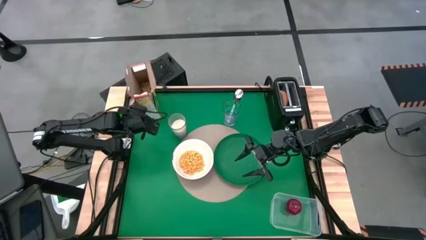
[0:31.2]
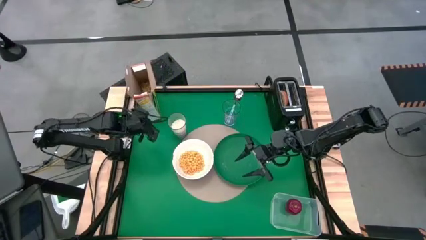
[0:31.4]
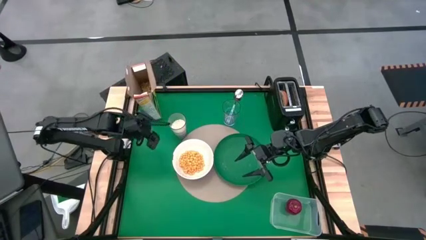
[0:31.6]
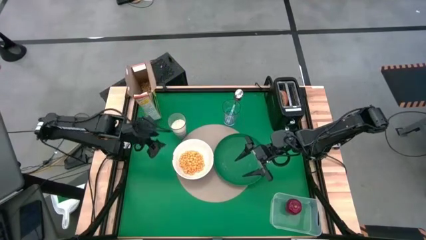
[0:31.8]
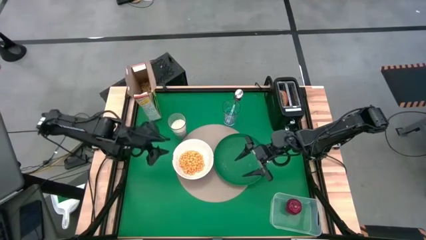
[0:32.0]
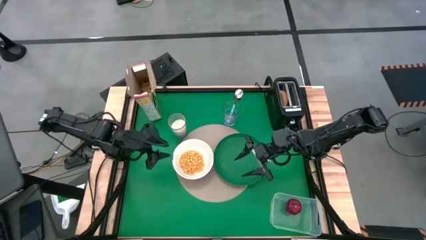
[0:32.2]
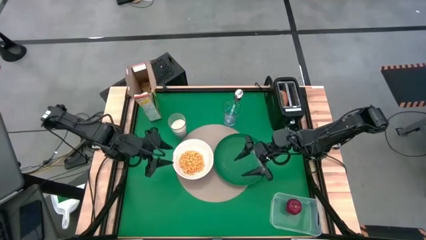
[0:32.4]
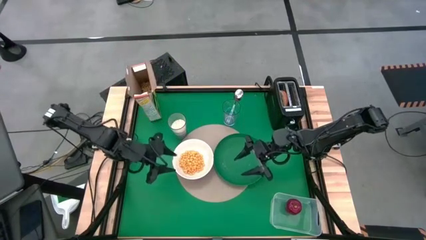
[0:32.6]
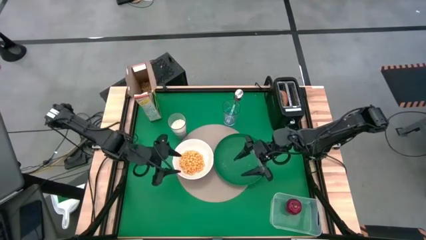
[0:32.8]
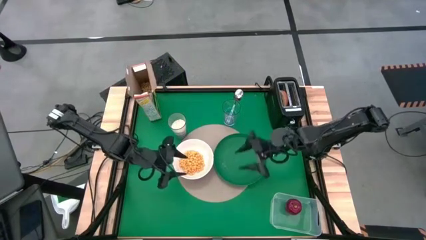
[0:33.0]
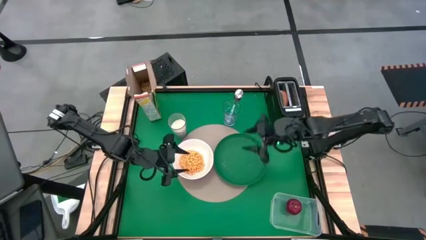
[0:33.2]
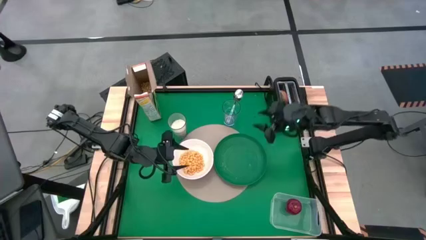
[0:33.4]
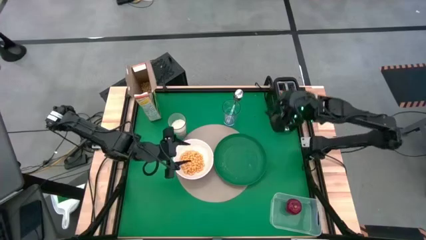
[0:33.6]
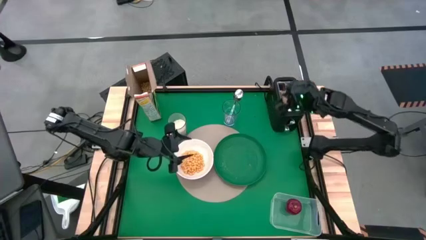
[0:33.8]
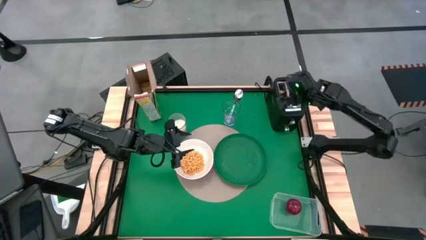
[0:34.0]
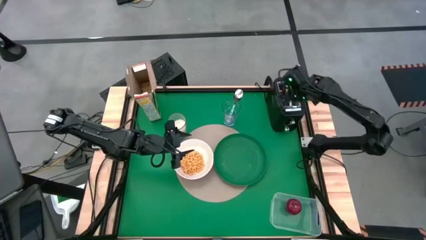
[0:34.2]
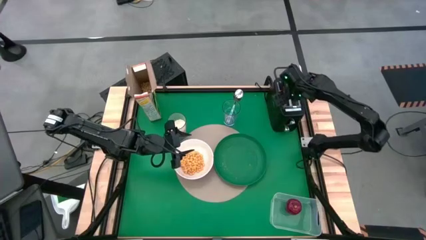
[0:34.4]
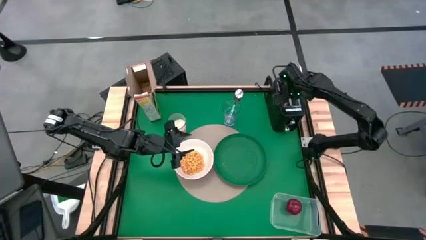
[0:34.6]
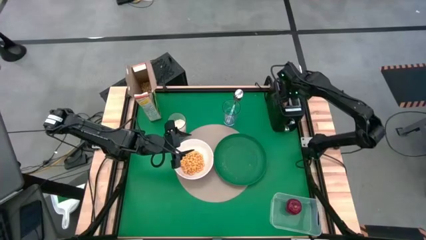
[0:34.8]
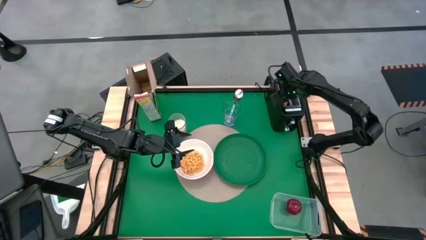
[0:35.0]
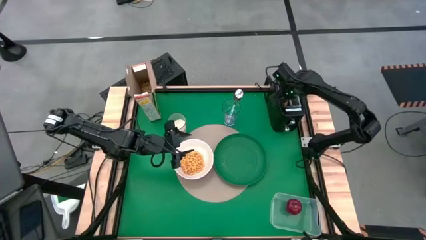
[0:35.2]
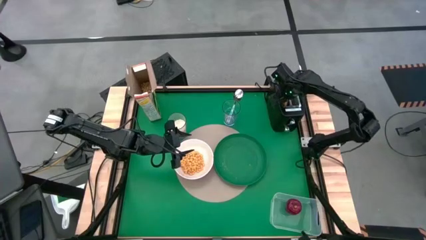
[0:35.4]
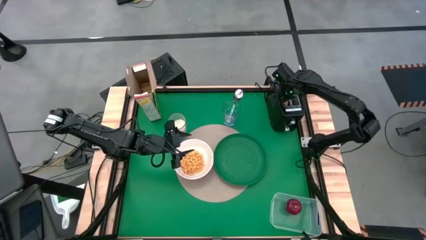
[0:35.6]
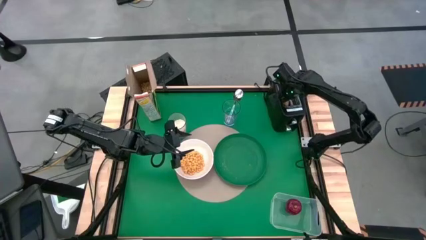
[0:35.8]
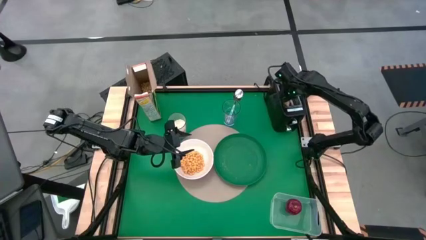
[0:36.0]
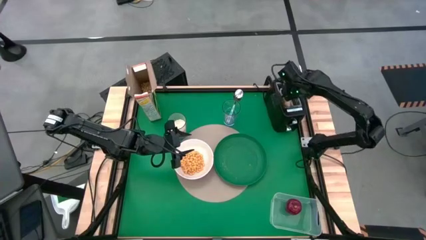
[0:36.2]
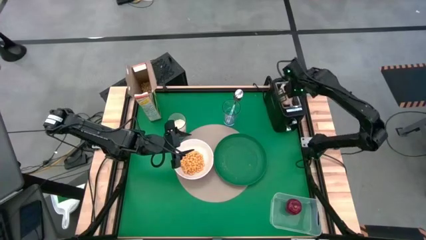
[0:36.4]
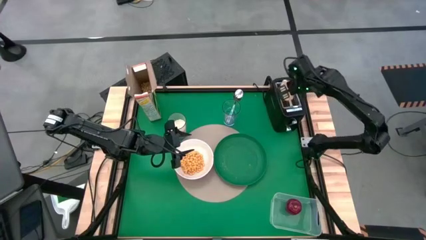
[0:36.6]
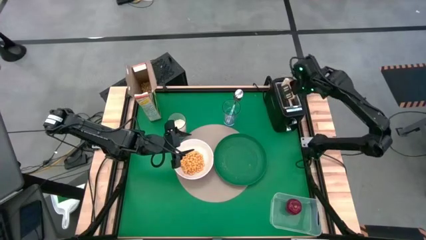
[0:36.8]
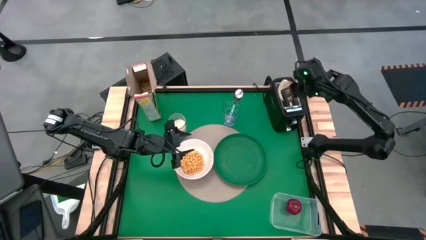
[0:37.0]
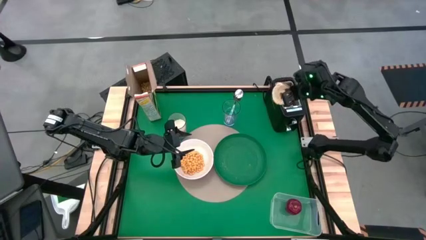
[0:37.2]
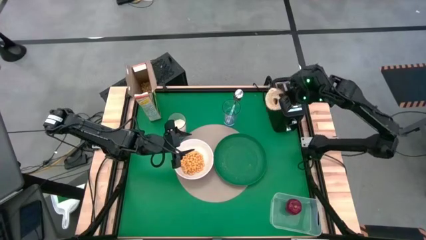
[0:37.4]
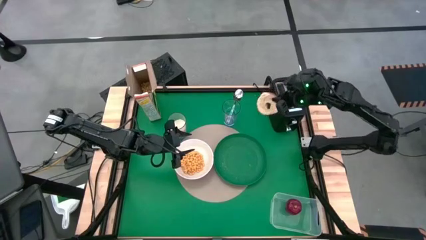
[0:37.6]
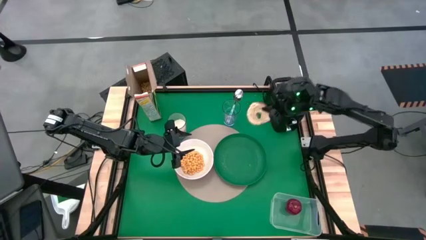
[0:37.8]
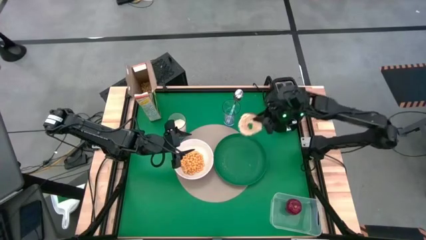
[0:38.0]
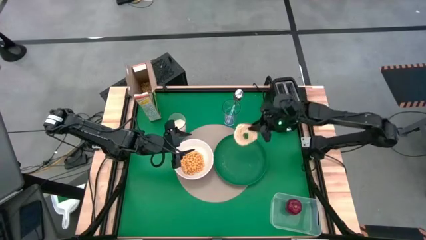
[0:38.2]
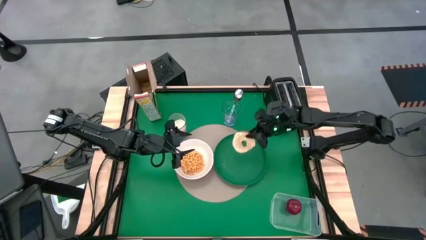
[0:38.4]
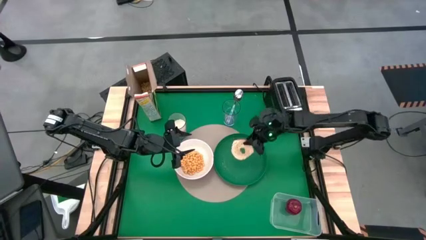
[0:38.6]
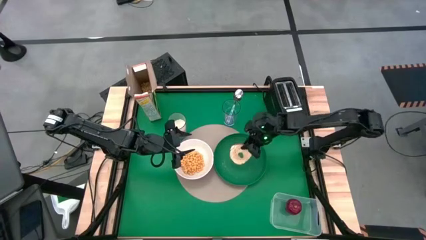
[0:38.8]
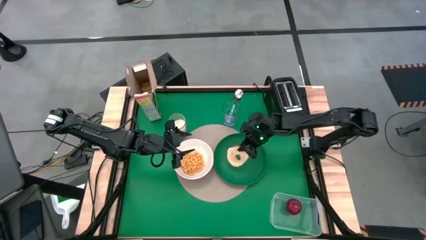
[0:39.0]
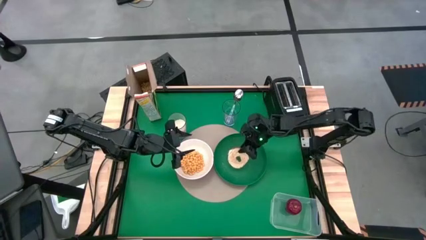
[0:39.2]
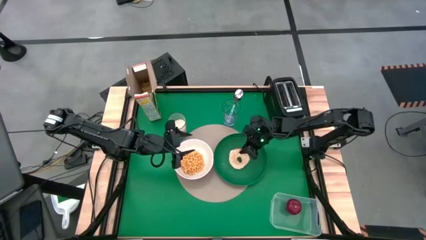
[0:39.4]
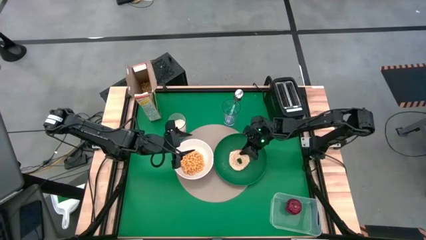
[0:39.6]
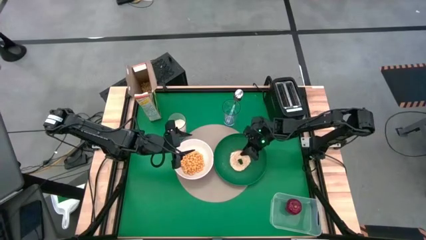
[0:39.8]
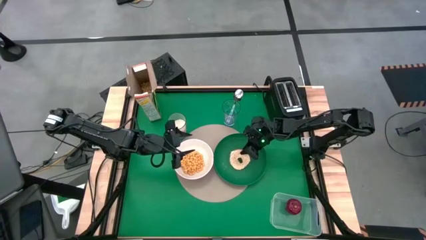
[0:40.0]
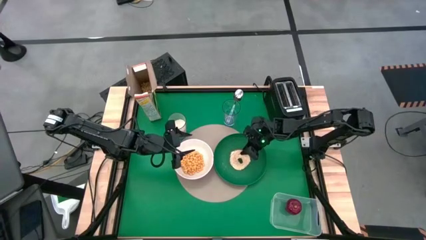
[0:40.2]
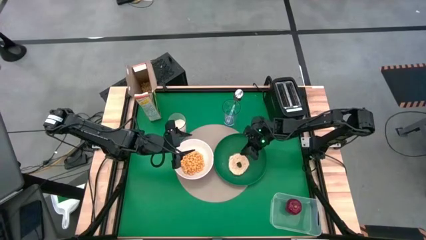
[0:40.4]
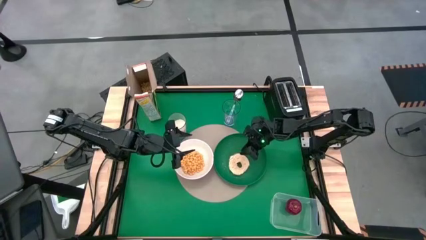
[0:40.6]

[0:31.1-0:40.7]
Task: Arrange a breakfast setting
Put the toasted bagel on the green plate

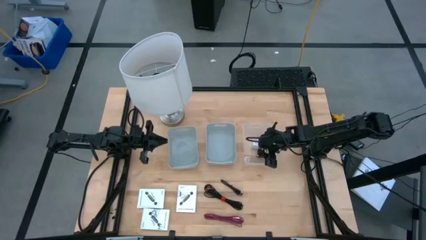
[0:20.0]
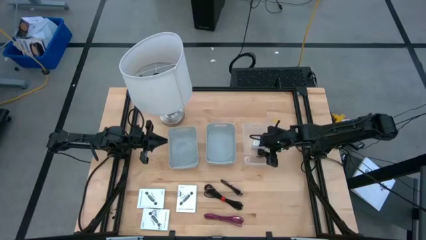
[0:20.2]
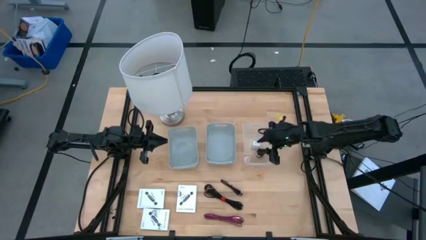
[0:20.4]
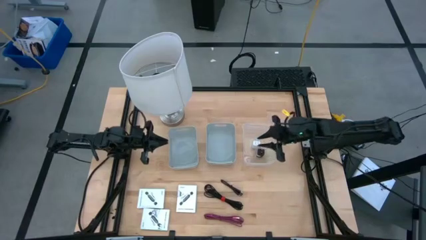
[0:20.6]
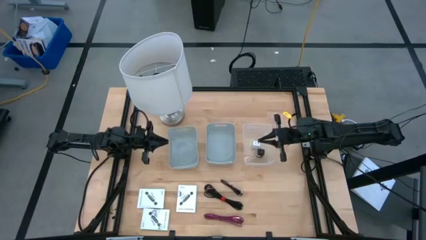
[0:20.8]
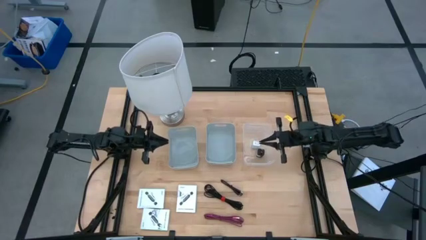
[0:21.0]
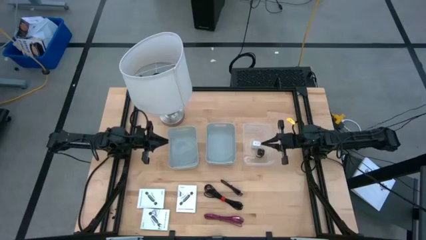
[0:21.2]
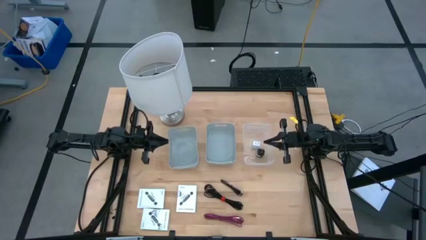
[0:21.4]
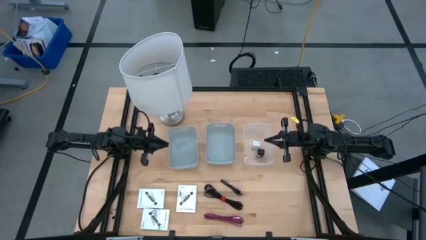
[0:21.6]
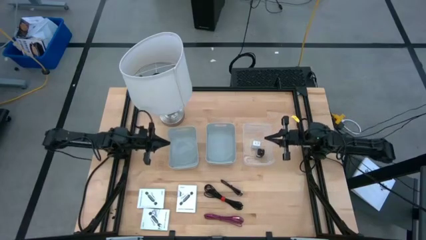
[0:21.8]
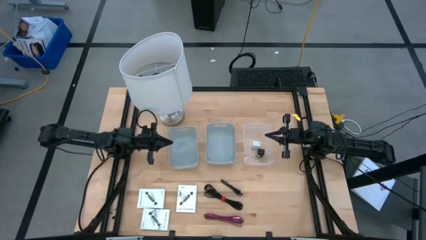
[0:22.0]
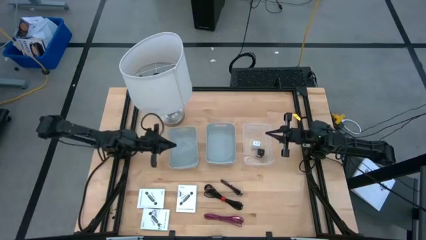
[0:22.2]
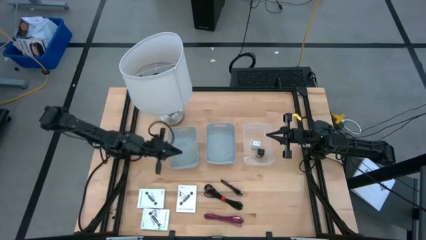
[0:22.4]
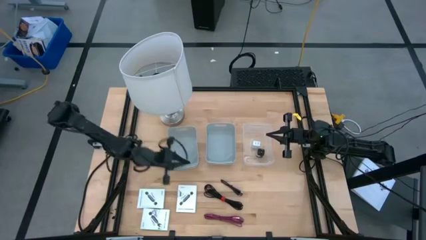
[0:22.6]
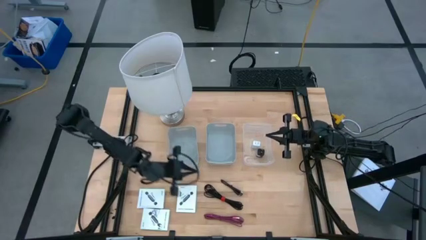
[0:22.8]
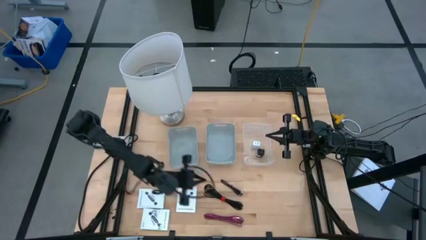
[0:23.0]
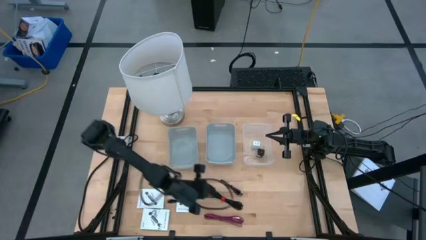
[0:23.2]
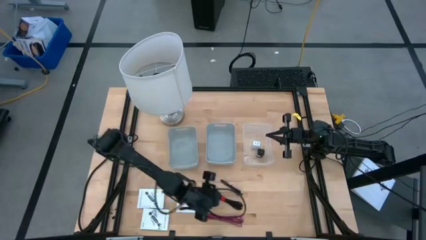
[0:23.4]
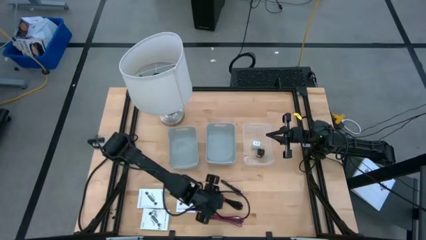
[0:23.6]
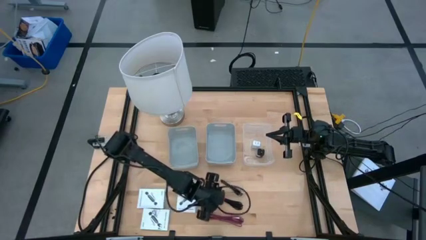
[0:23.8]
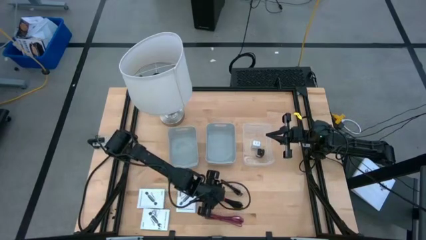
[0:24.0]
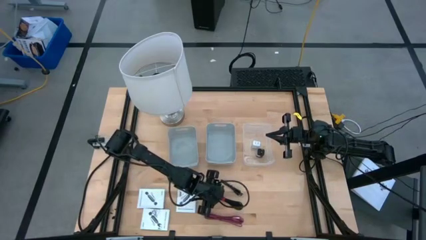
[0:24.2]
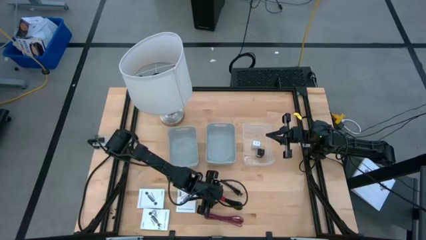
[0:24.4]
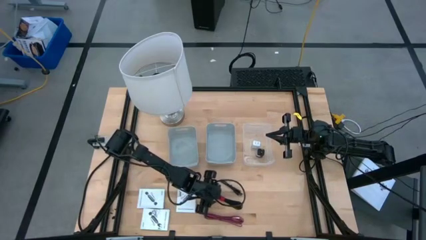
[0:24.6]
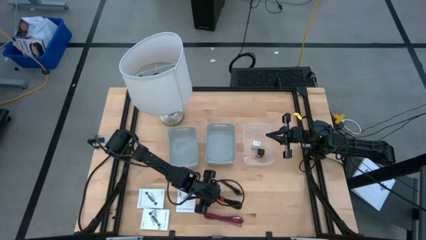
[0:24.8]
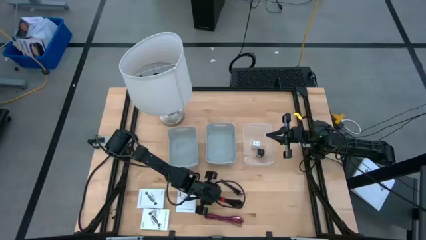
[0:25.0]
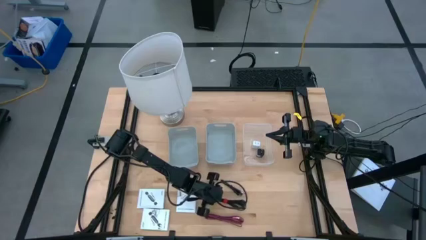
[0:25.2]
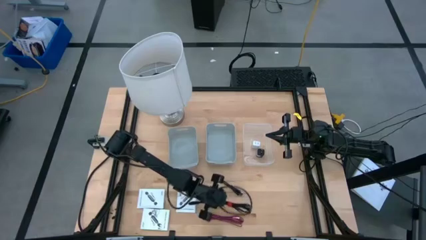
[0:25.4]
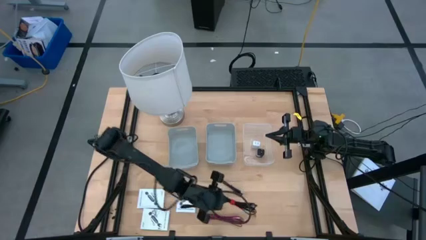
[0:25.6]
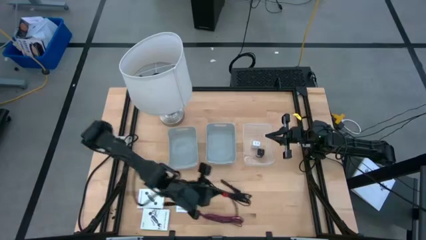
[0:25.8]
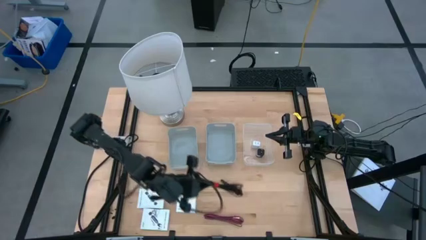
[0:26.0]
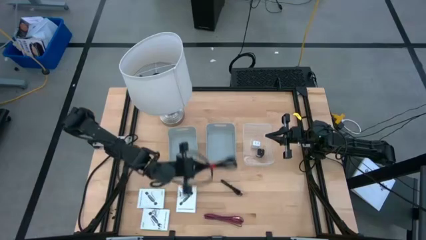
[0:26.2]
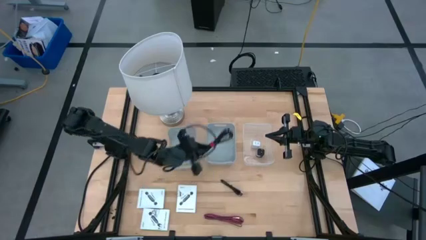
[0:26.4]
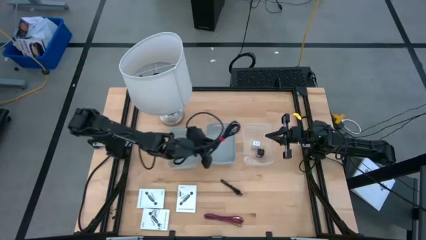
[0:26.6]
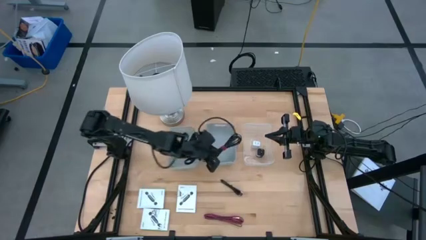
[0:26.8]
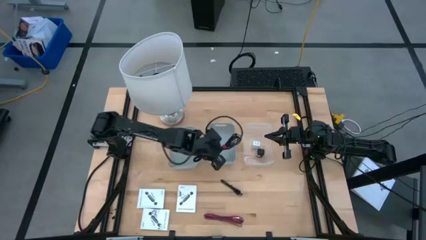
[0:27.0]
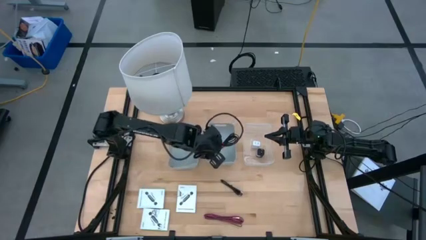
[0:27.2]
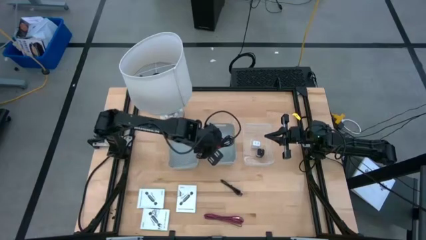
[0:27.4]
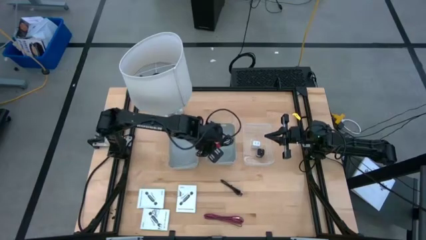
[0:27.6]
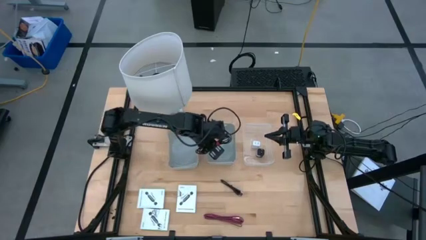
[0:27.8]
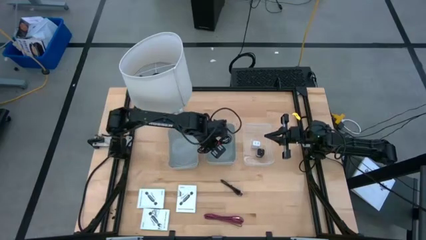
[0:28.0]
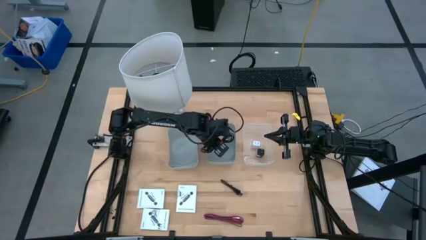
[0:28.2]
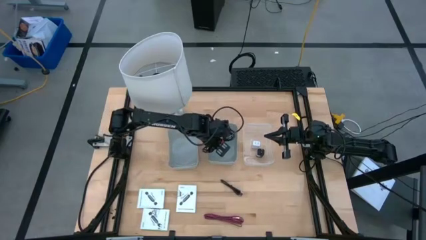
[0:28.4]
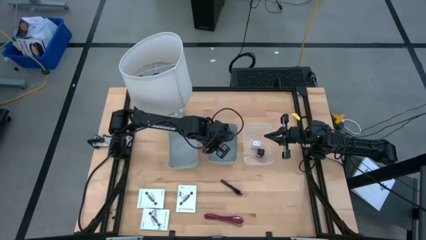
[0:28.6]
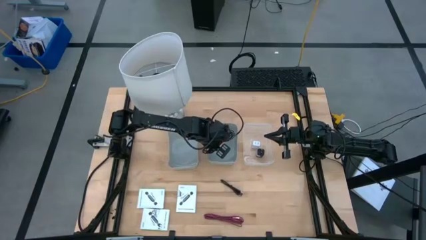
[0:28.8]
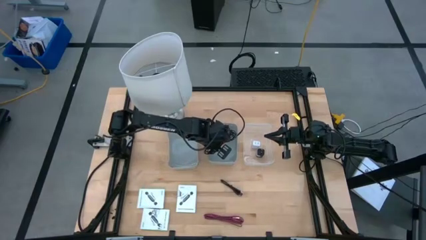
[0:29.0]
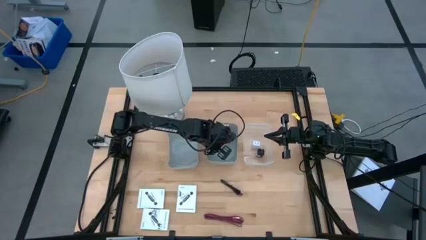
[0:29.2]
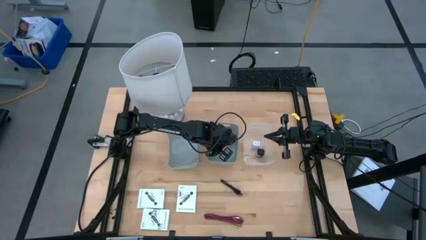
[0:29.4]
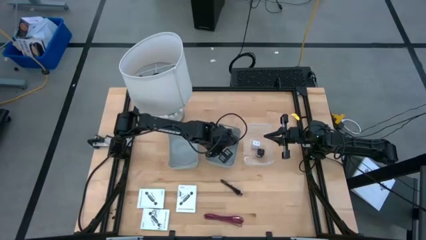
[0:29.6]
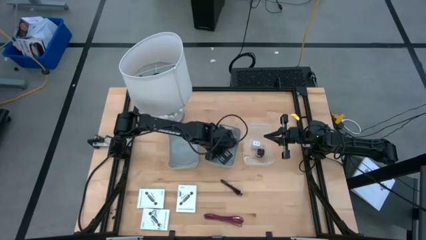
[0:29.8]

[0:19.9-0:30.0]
Task: Pick and place items into bin
Put the bottom black charger cable into the right gray bin
